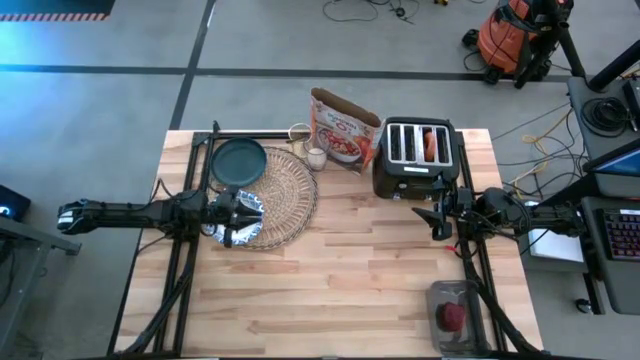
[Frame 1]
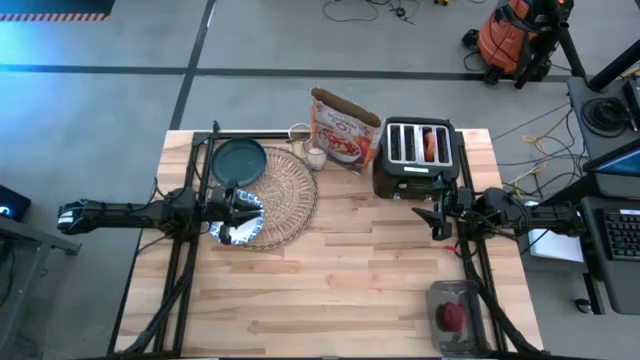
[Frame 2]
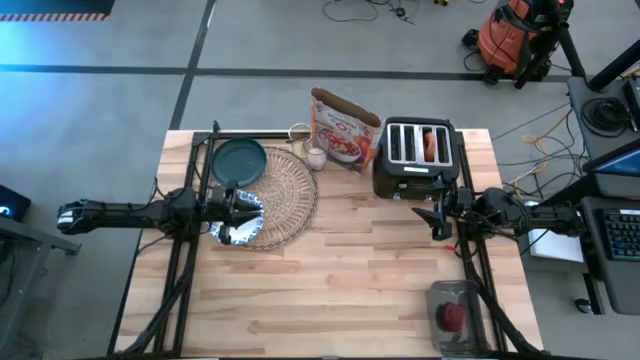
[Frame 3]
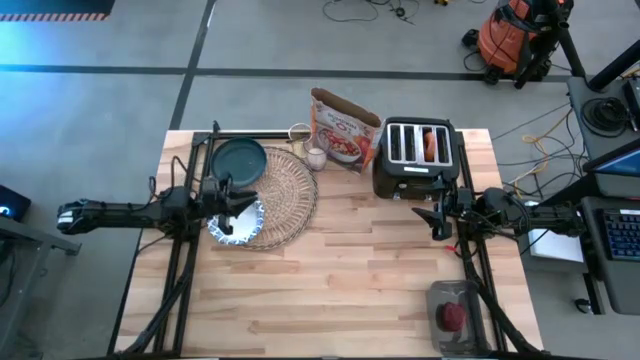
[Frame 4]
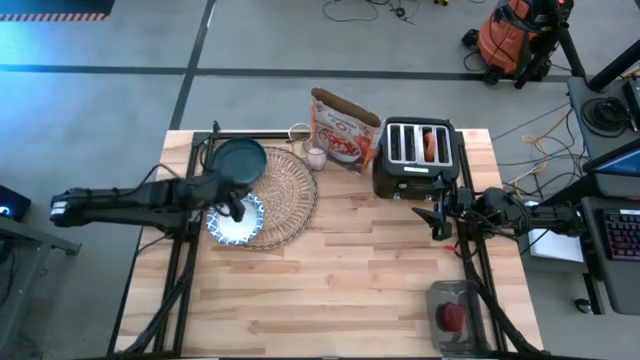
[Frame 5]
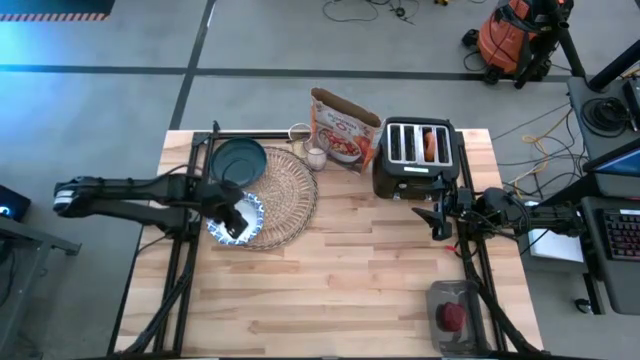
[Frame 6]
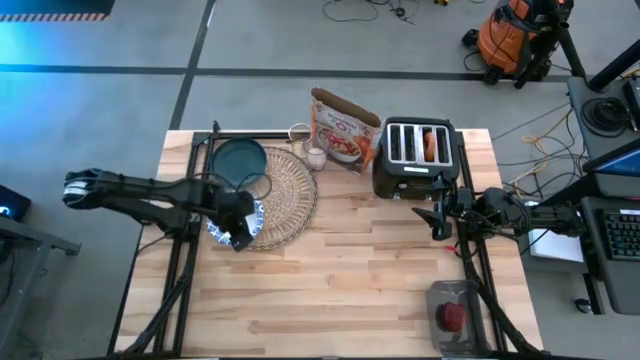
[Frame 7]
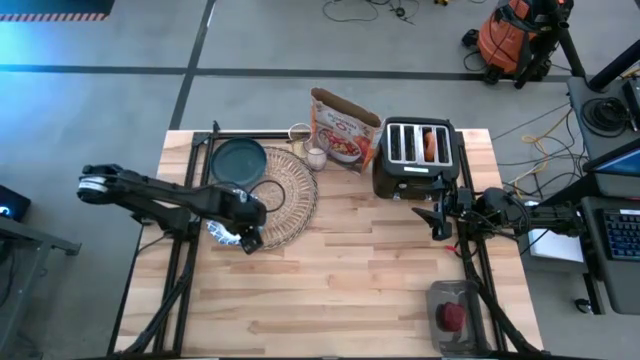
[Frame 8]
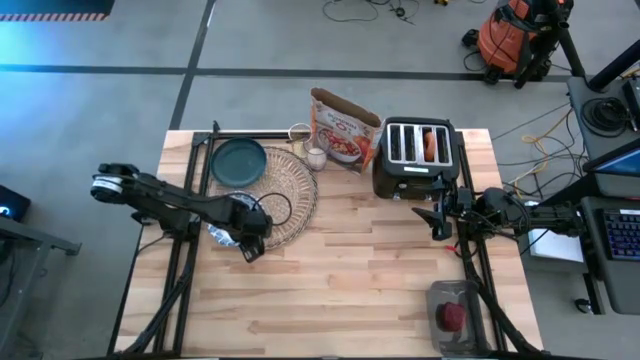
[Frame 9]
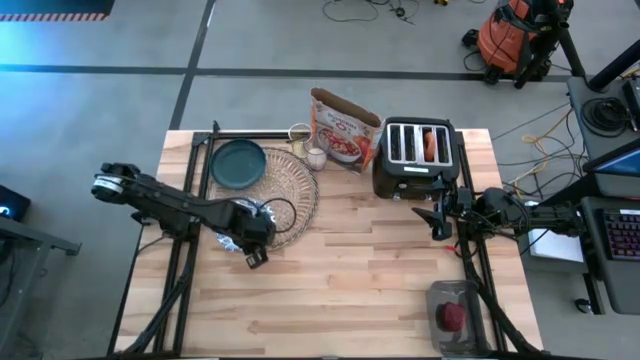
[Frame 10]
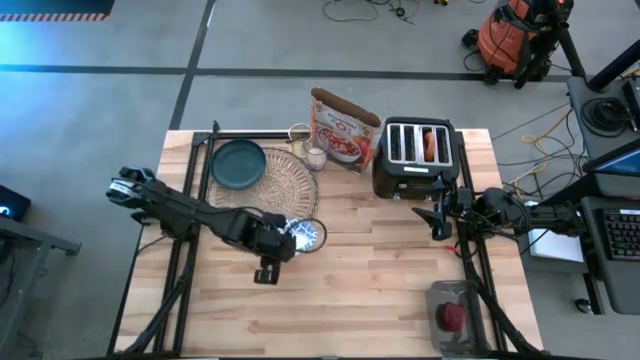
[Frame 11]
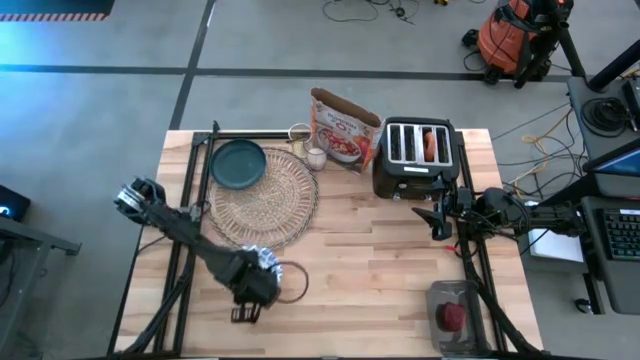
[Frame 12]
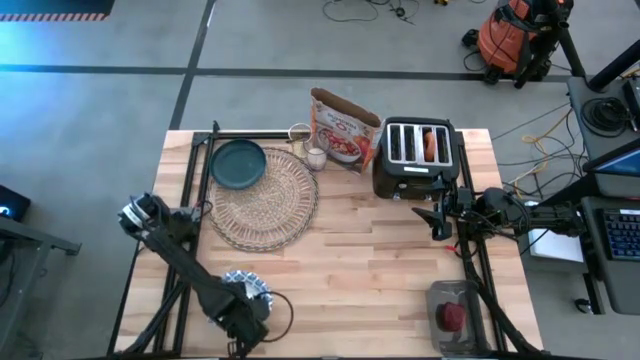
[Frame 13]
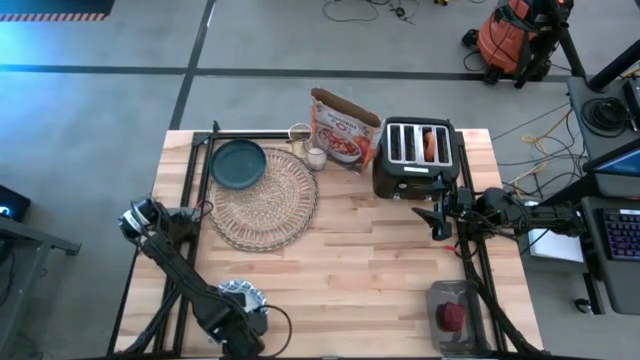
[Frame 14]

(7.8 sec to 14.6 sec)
Task: Arrange a breakfast setting
Remove the white bowl from the brown placemat

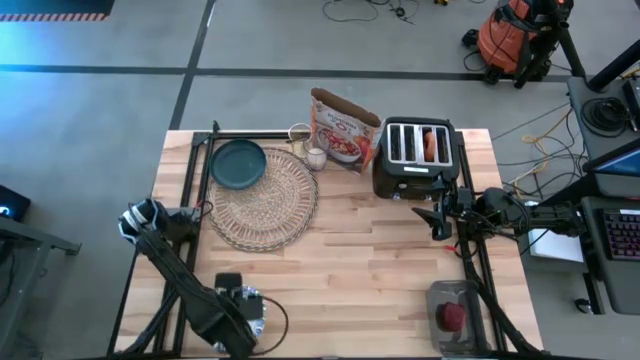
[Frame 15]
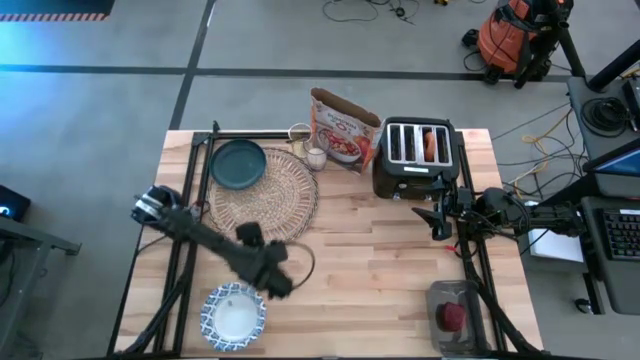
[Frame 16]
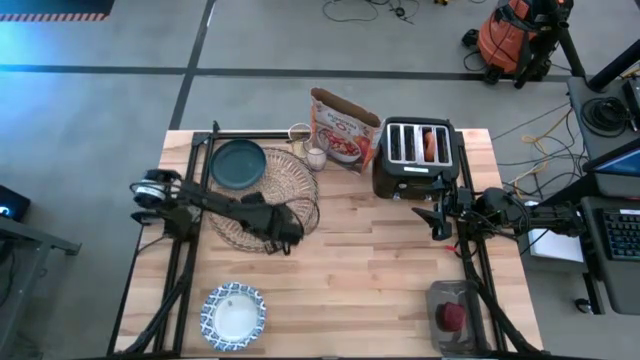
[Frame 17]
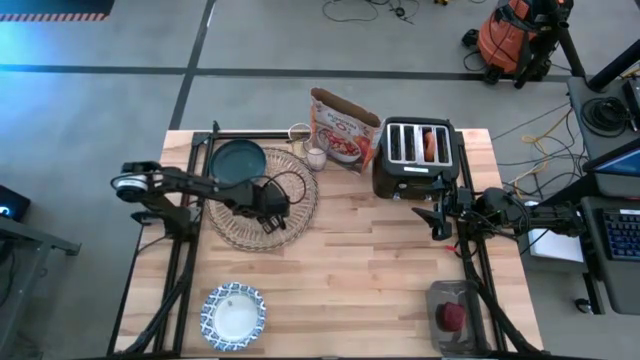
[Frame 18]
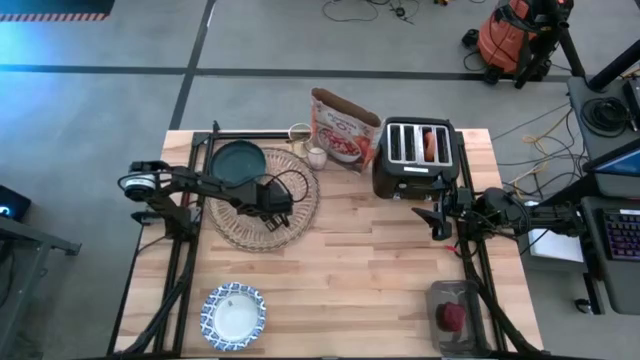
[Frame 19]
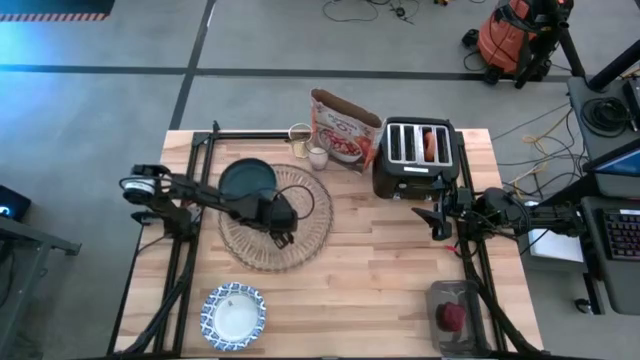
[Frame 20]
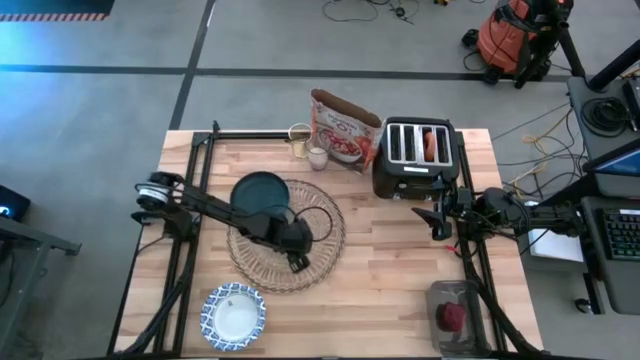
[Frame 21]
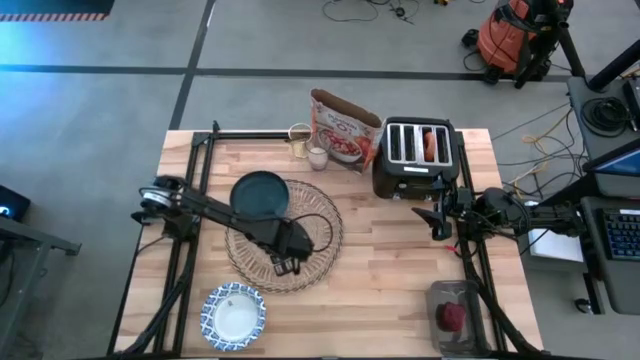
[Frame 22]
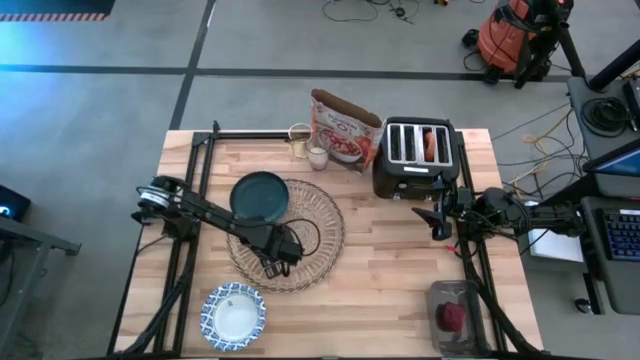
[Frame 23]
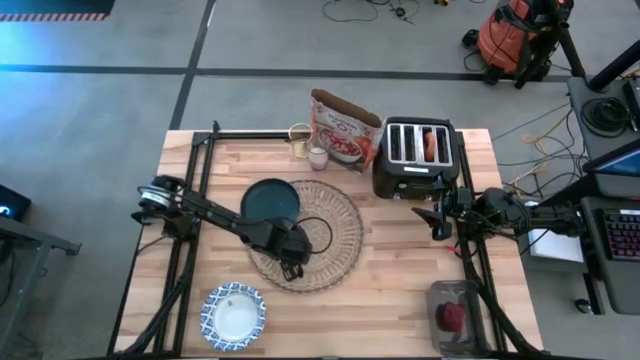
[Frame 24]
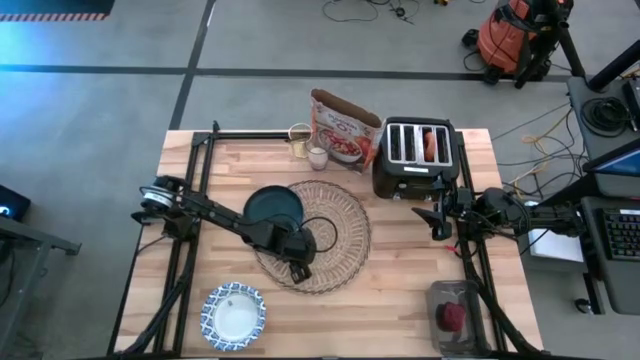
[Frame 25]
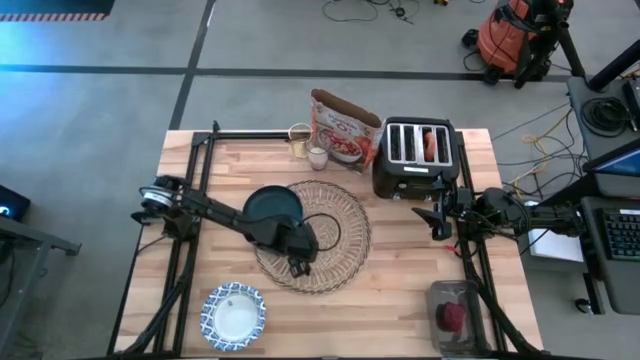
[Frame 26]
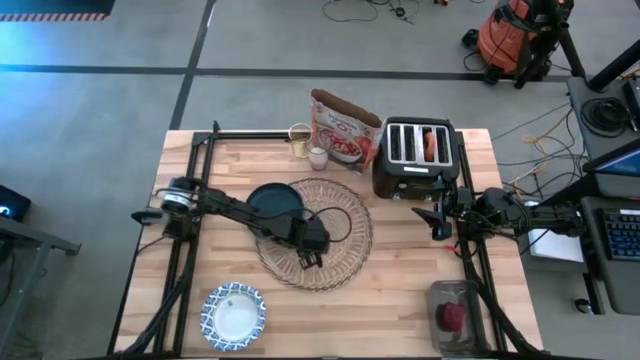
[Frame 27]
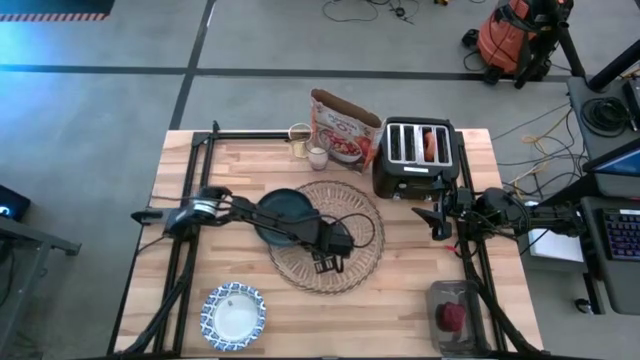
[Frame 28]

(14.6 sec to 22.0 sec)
Move the brown placemat to the center of the table

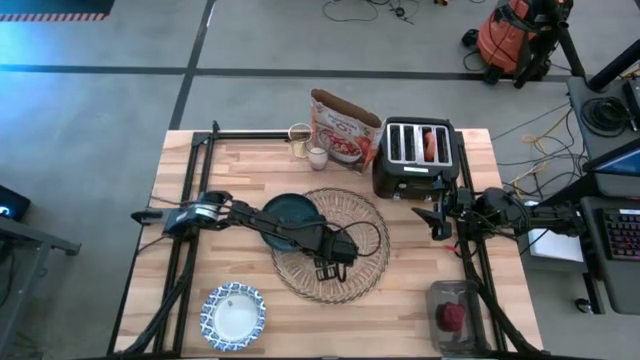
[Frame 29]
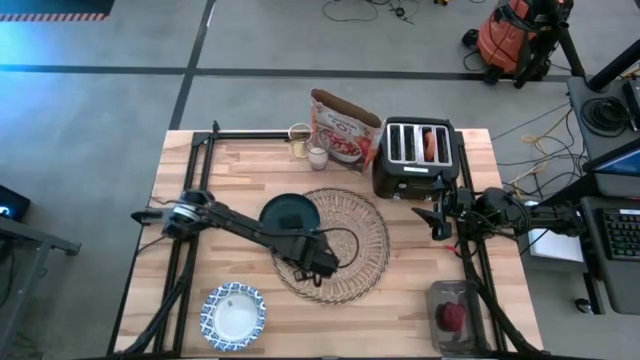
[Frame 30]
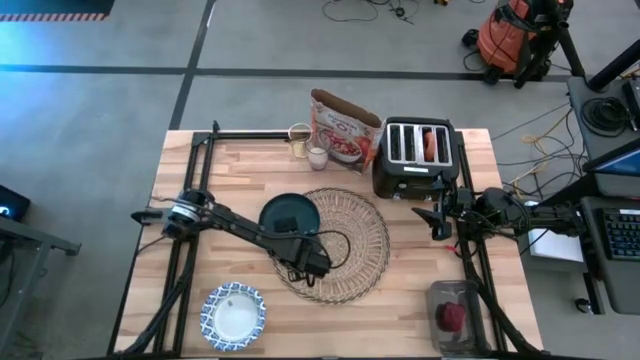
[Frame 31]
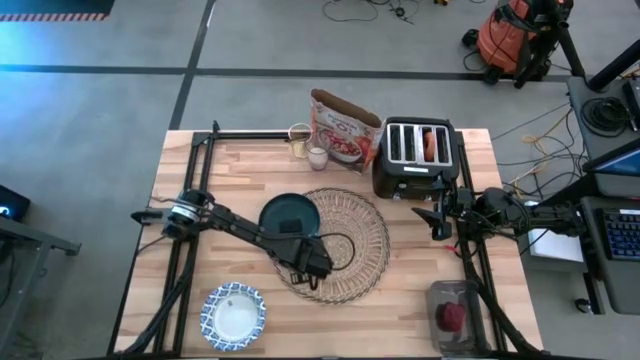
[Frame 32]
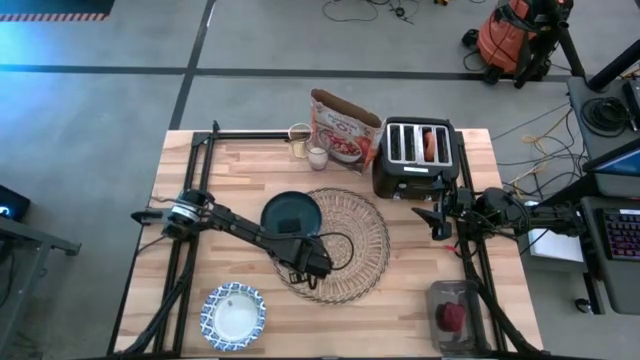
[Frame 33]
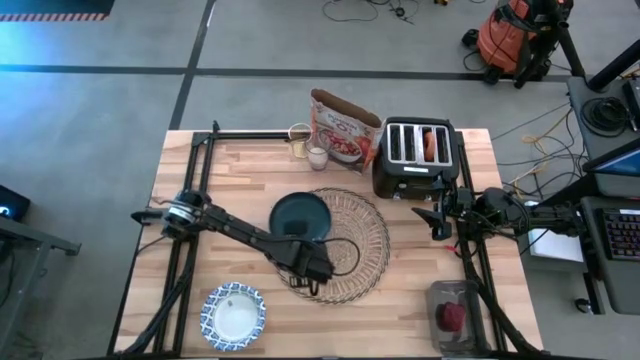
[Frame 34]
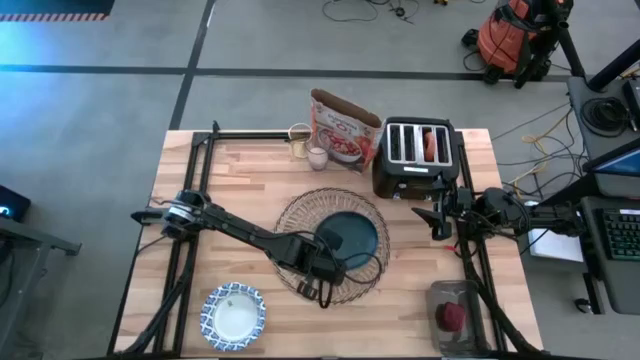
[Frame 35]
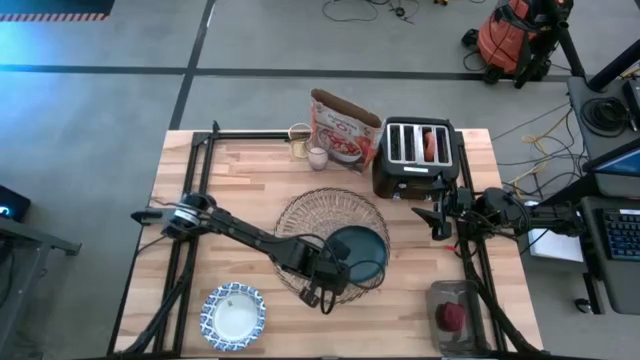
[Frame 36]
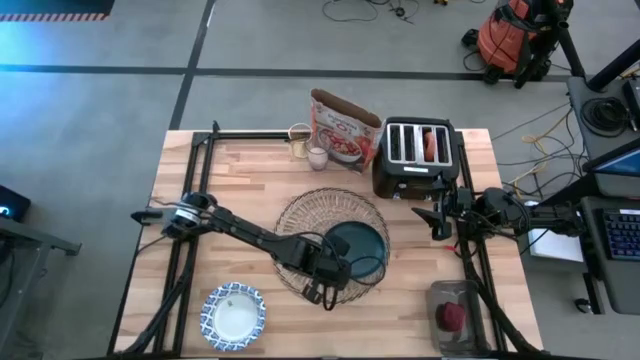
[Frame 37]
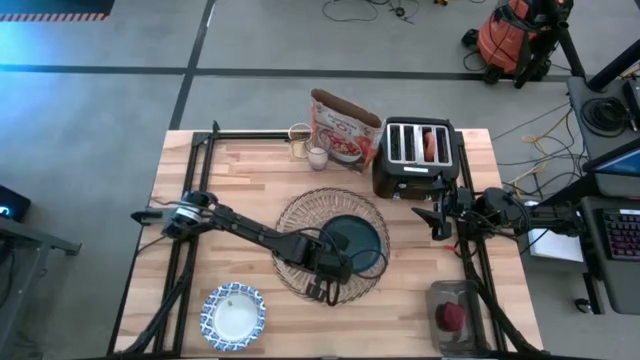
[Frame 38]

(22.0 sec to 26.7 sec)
Adjust the dark blue plate on the brown placemat

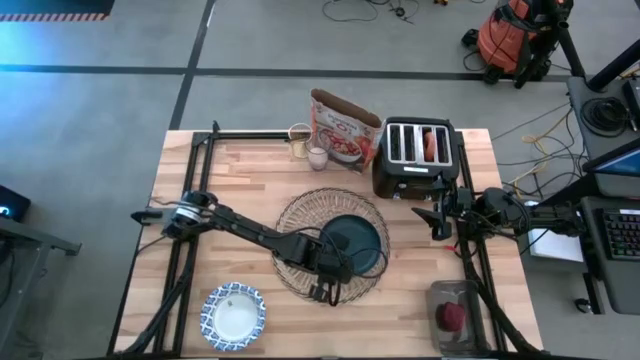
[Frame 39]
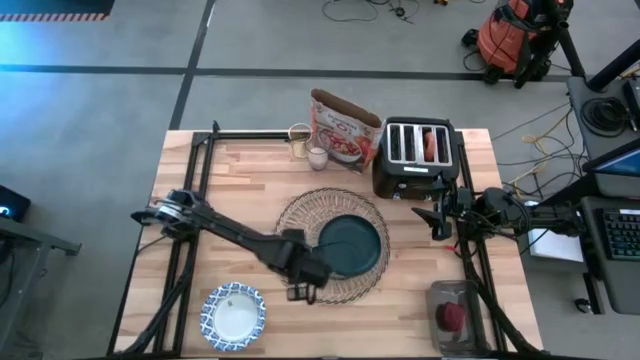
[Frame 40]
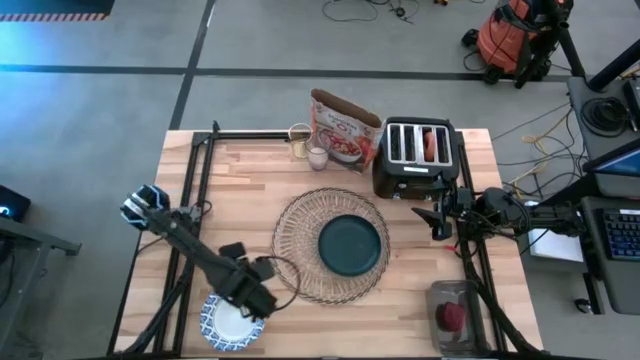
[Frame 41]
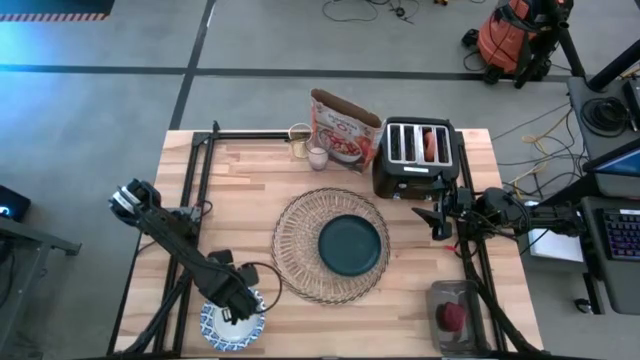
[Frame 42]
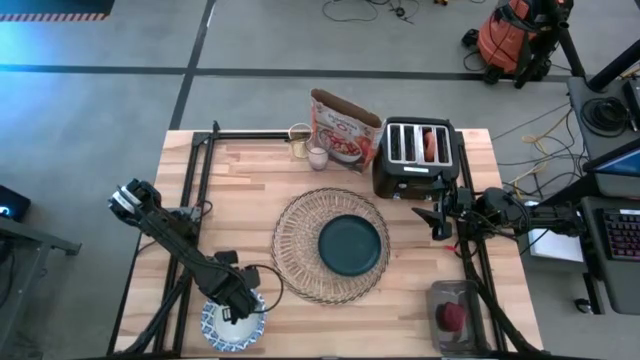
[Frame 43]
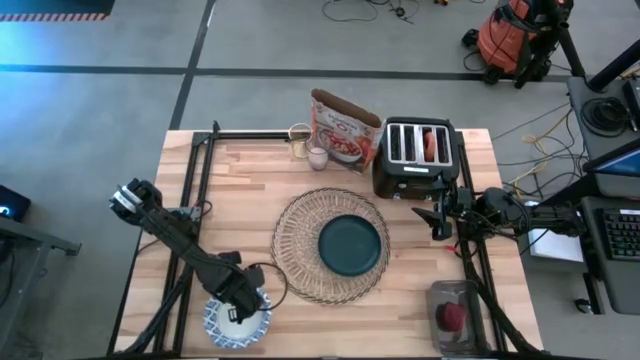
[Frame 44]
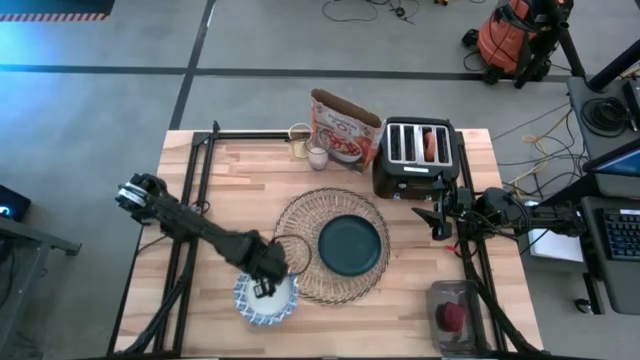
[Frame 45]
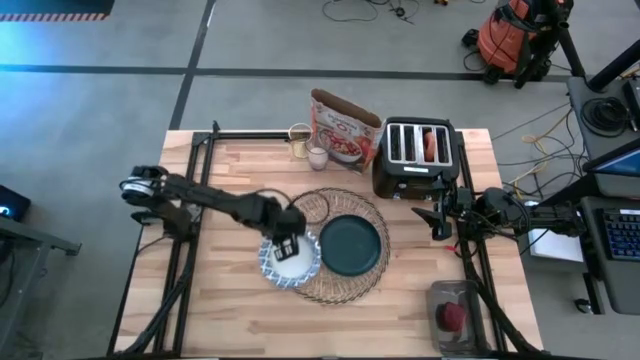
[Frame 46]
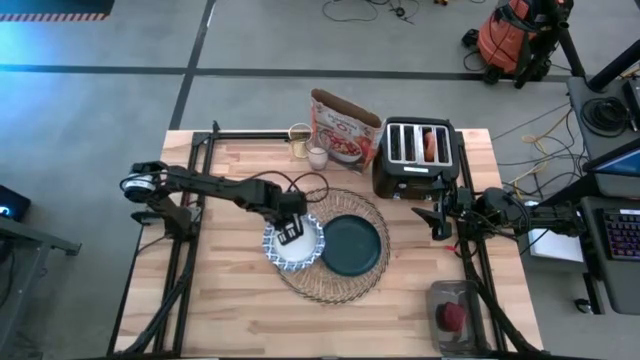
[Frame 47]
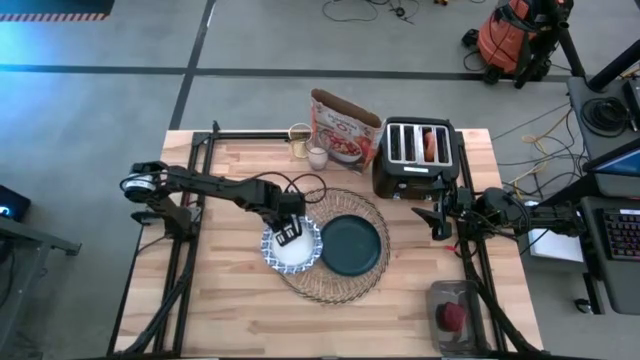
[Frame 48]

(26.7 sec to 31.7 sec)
Put the white bowl on the brown placemat to the left of the dark blue plate
